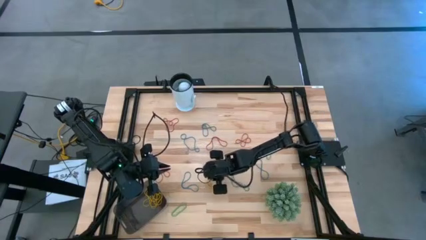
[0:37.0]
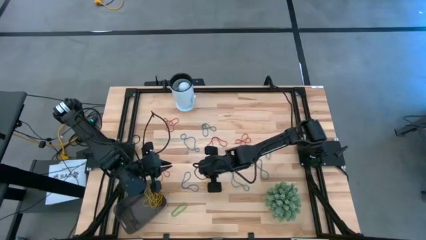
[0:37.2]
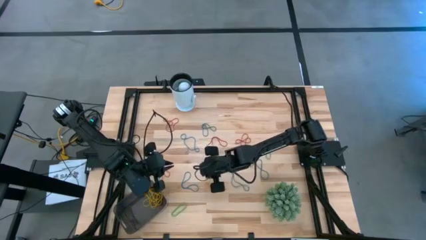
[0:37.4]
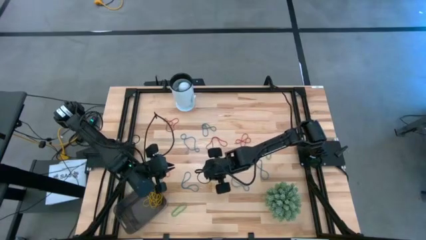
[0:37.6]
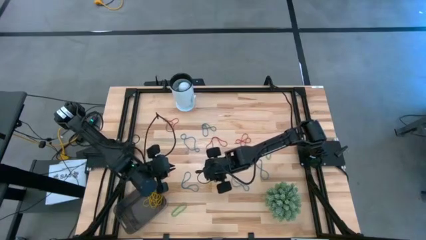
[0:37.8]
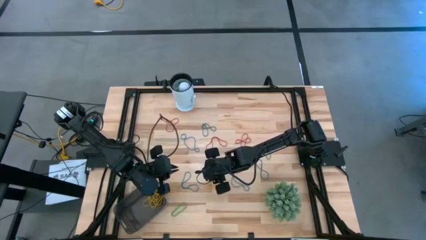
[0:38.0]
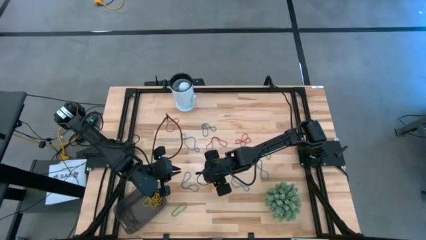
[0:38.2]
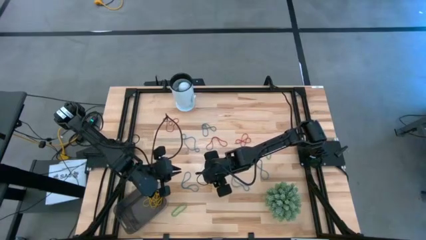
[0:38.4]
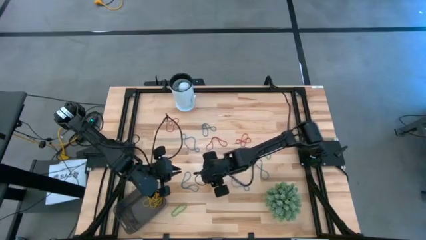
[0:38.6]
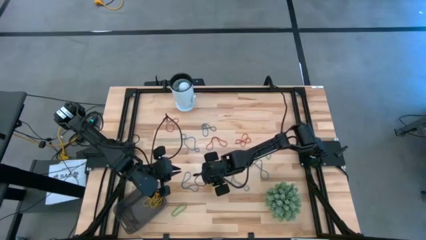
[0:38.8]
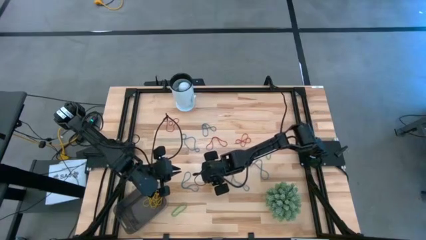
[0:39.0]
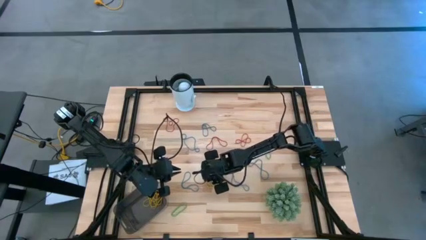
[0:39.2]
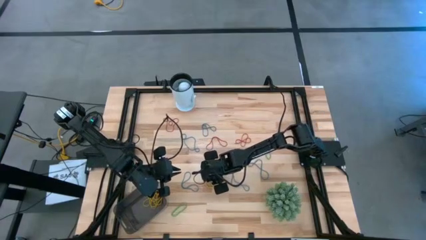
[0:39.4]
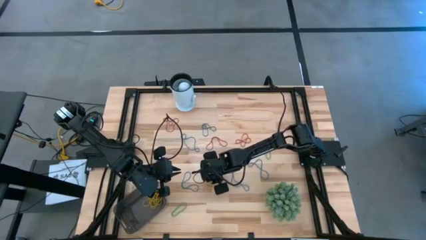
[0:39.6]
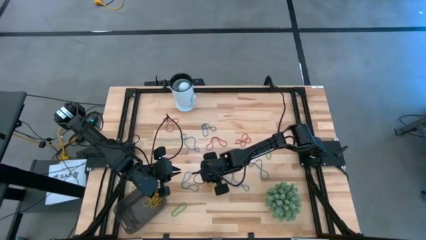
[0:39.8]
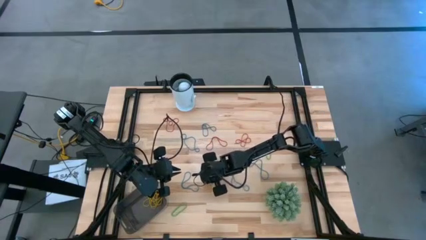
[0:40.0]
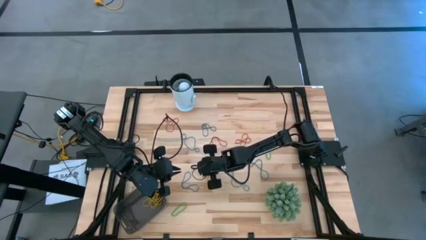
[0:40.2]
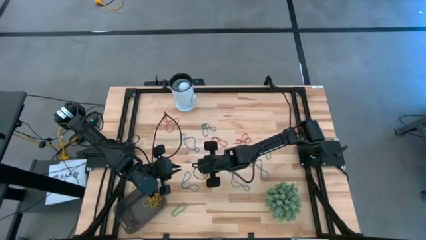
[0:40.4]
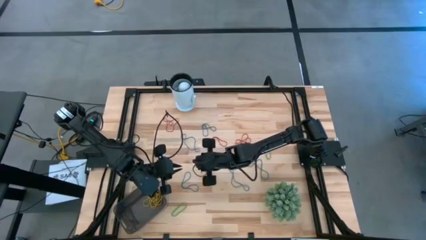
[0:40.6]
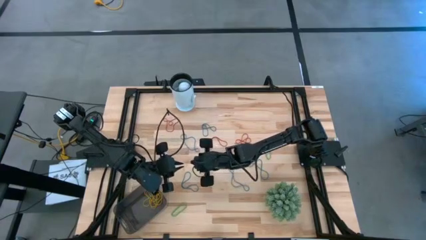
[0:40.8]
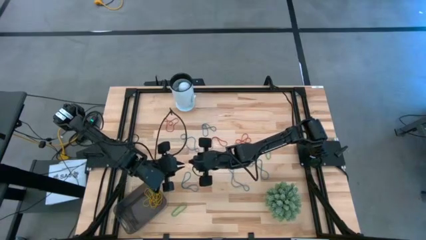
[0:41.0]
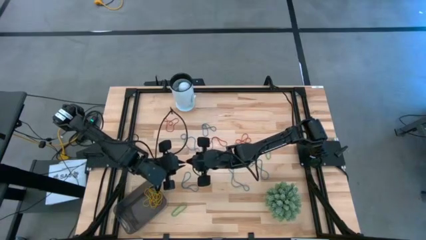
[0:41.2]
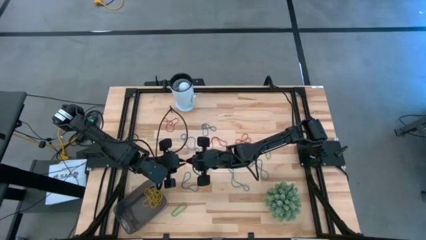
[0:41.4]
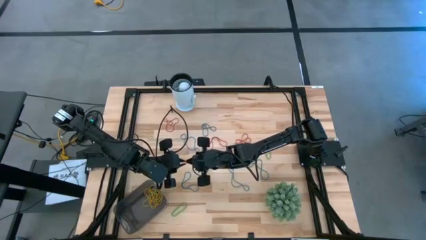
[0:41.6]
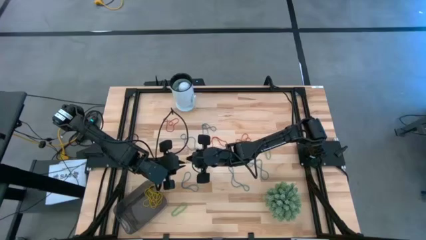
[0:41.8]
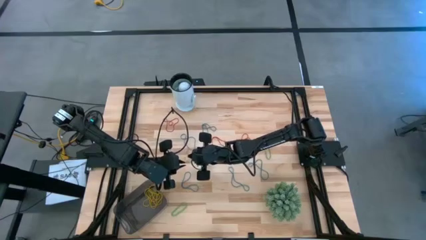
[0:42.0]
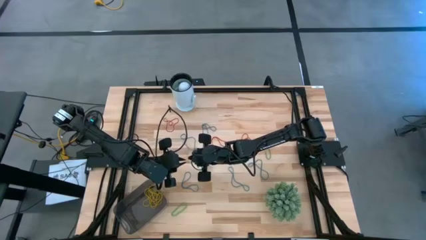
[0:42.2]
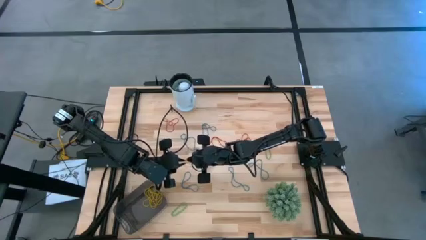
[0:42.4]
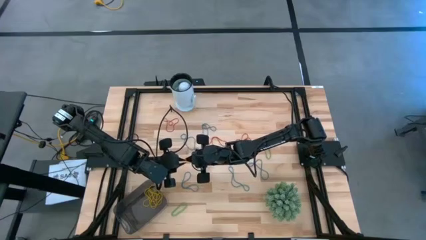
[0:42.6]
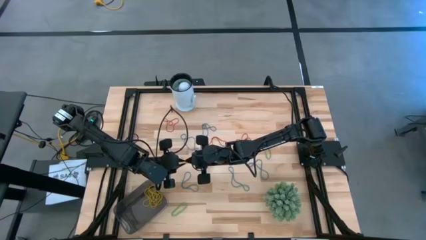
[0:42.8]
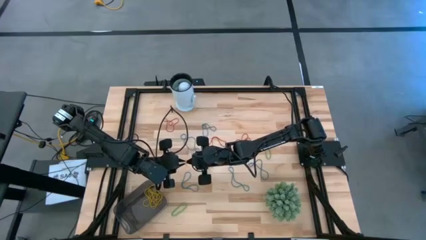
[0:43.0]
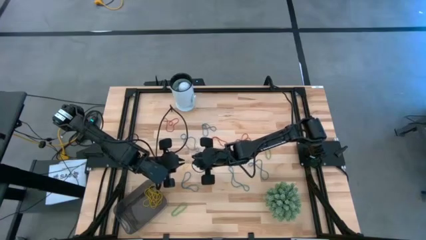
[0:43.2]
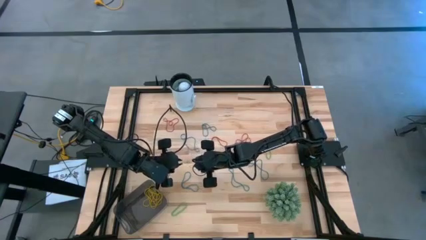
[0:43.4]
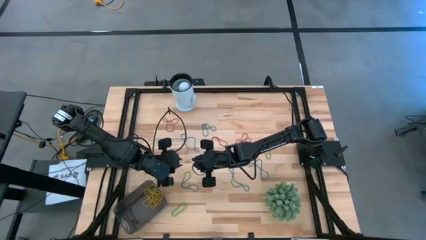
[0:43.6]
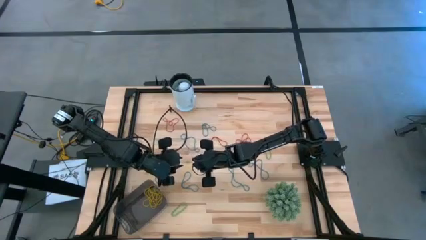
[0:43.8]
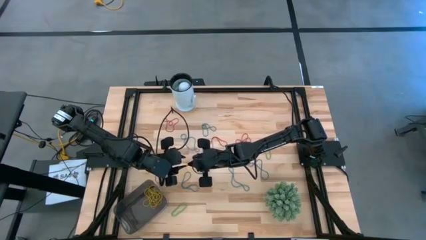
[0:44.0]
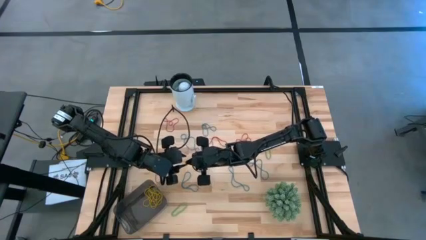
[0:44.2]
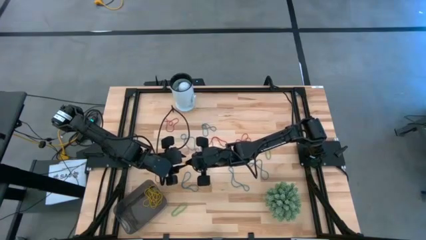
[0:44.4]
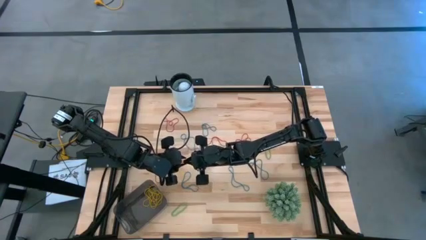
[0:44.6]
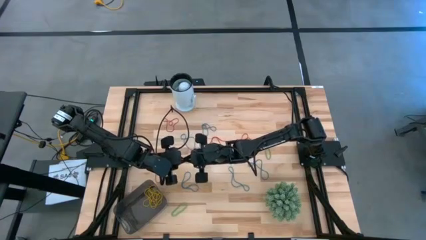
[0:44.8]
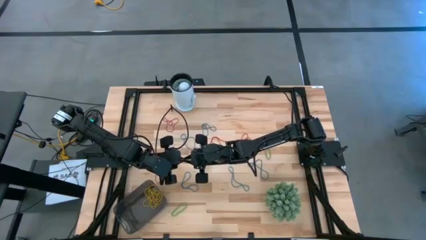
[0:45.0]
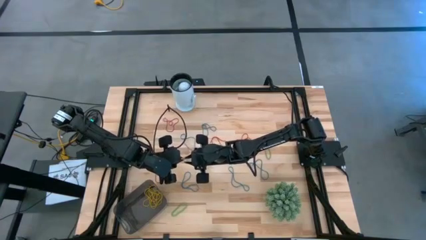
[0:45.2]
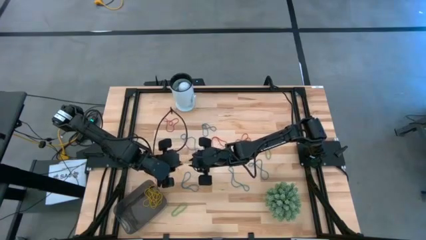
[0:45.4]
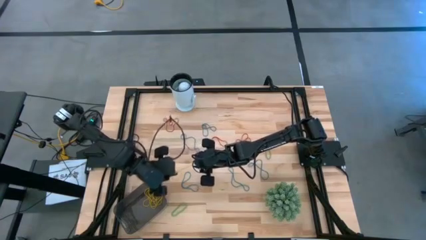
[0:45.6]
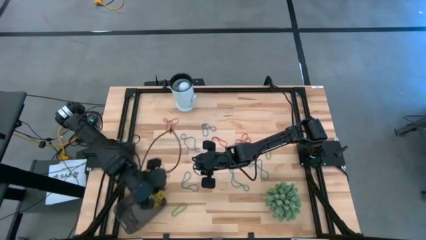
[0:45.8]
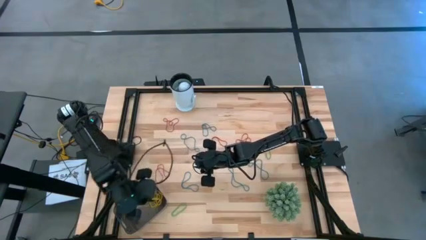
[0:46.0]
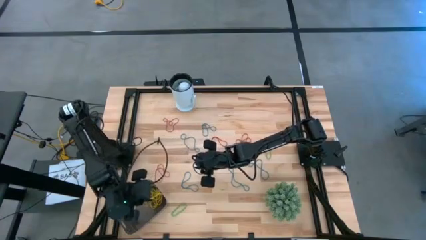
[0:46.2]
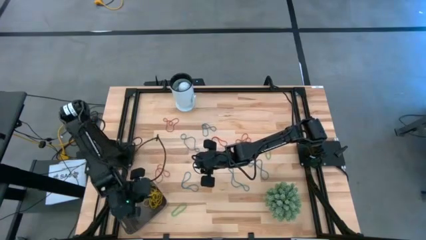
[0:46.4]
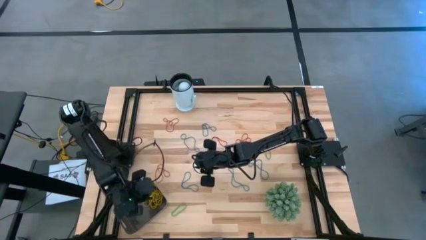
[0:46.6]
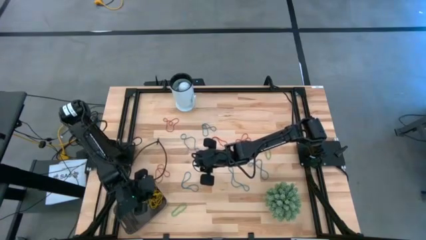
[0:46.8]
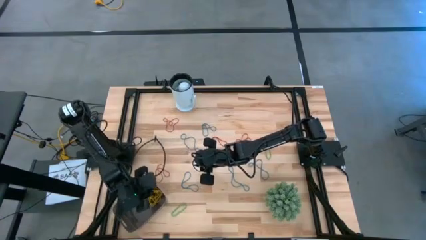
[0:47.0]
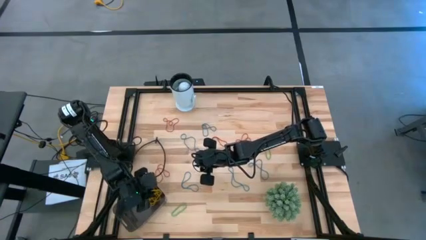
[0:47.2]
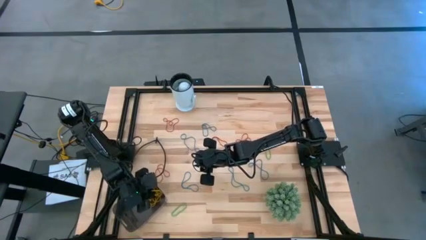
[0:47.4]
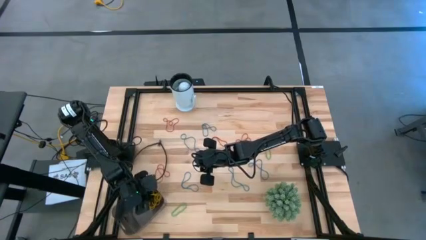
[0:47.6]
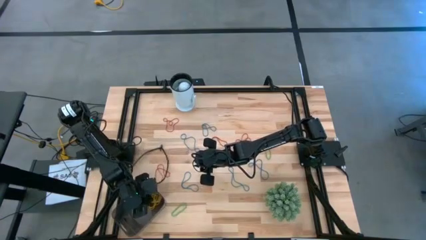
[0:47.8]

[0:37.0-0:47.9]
Task: Pick and place items into bin
Put the yellow rubber band into the black bin

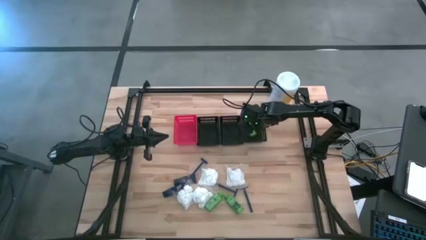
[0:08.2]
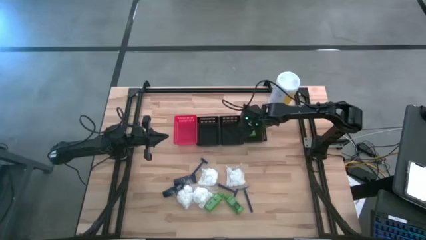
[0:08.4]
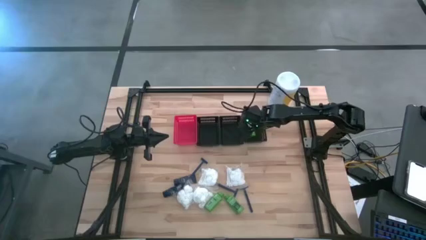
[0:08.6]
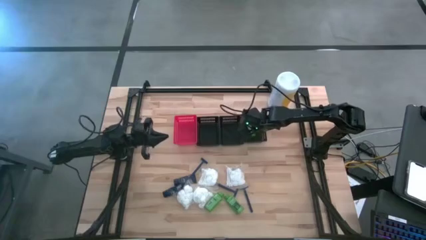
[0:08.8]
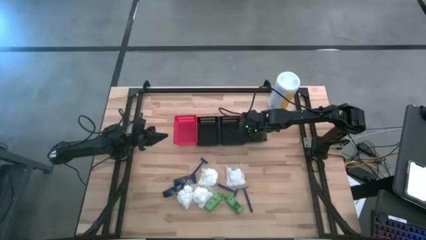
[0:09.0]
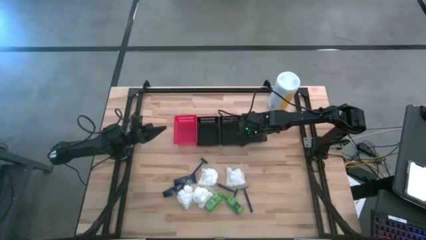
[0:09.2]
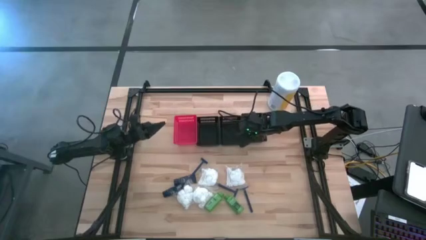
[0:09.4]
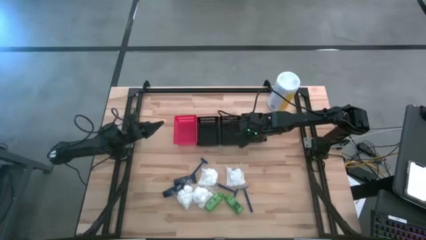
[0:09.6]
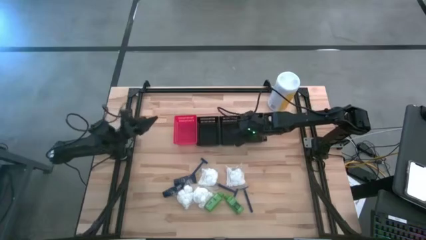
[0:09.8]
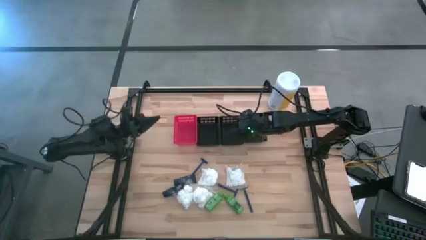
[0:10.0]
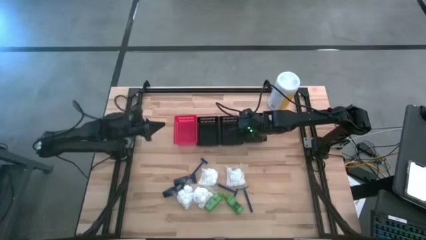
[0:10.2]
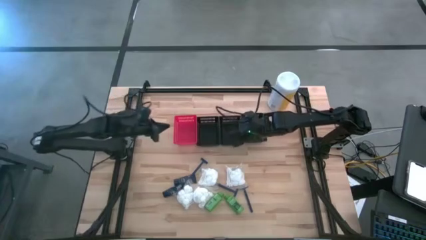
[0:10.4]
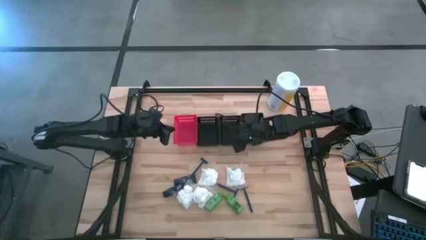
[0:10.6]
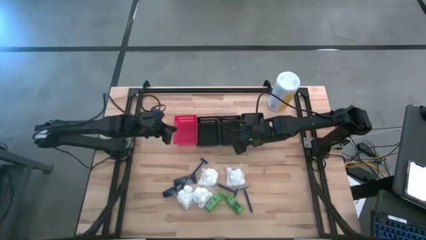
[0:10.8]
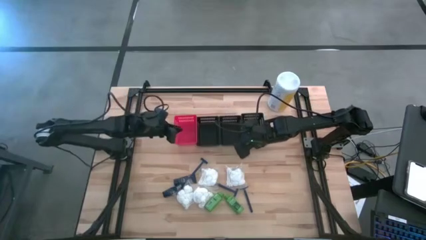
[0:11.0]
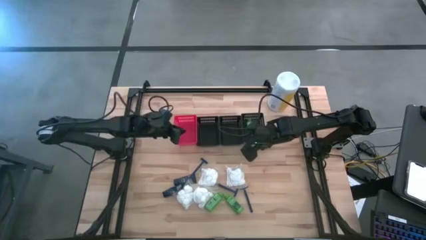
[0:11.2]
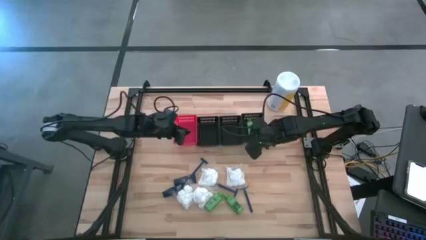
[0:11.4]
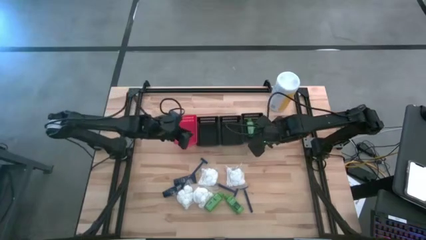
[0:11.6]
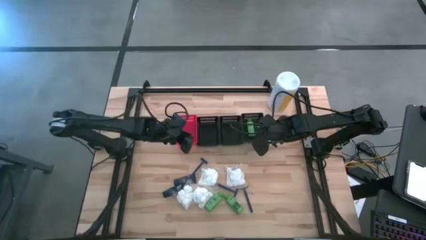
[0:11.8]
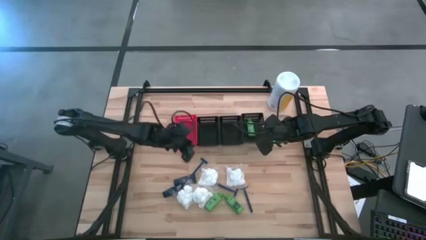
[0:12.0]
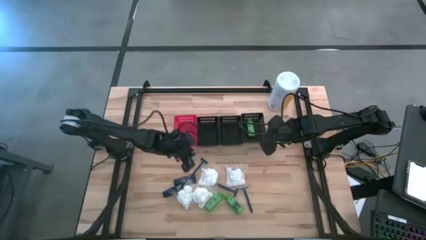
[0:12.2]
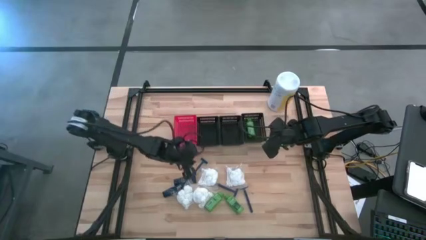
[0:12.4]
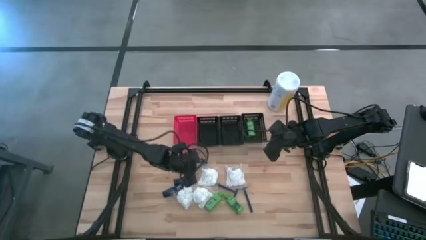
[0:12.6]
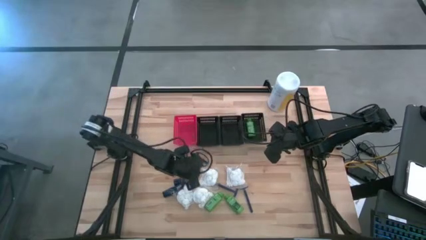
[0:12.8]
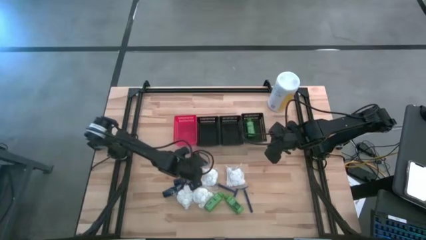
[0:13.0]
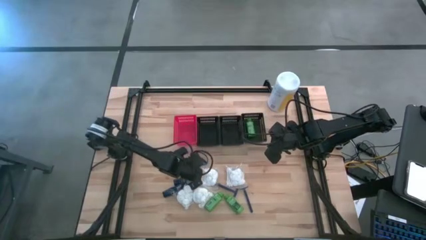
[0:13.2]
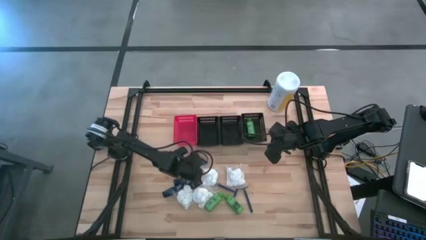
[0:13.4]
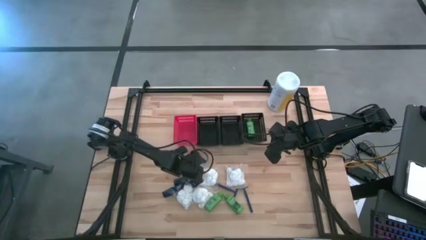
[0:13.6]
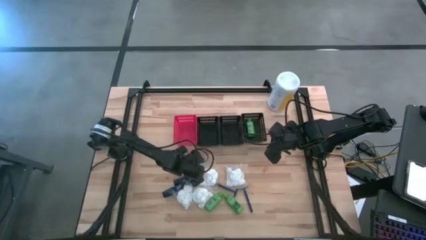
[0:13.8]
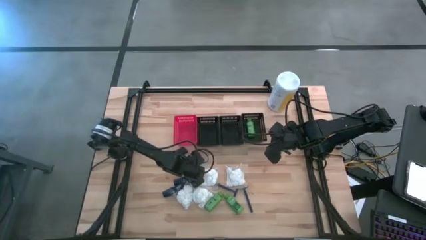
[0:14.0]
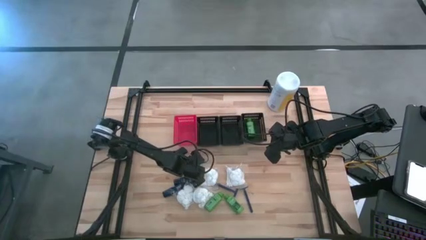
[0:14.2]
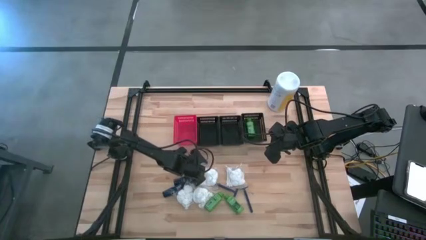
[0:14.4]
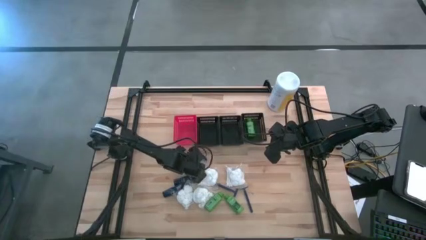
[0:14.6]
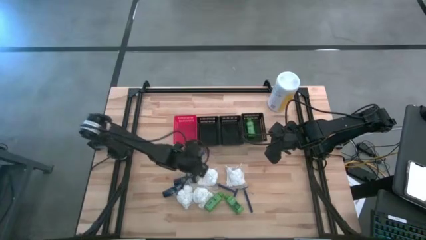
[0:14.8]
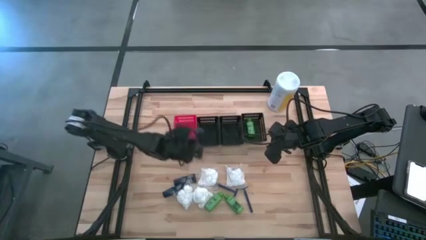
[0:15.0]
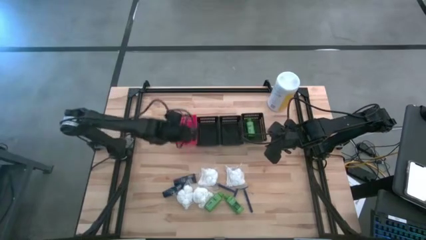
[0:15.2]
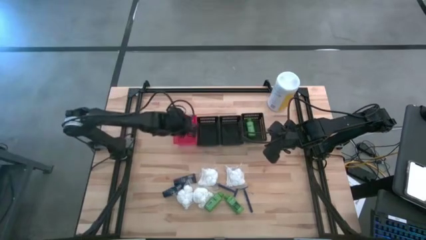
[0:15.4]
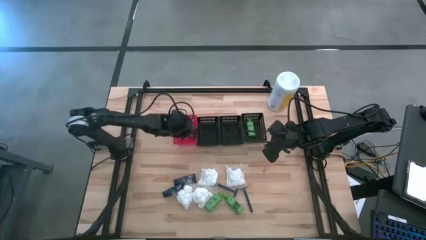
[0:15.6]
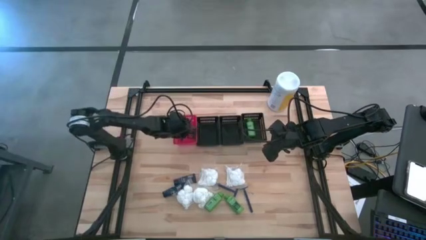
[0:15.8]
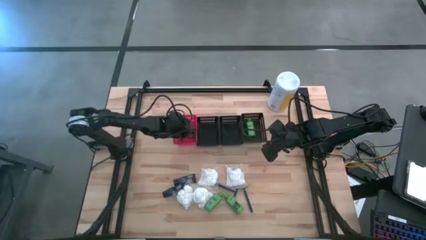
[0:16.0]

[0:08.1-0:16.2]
Task: Pick & Place Travel size toiletries
Put the razor into the red bin
